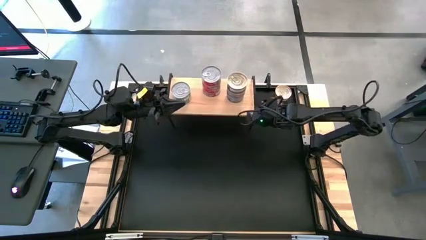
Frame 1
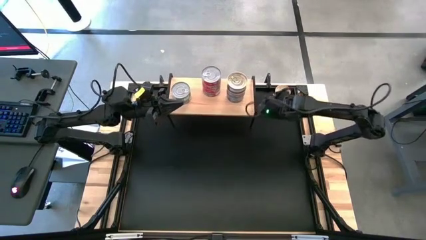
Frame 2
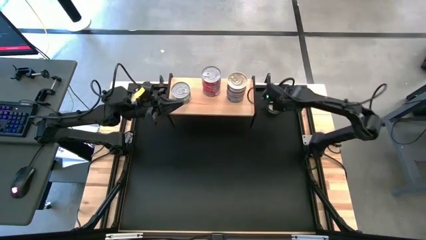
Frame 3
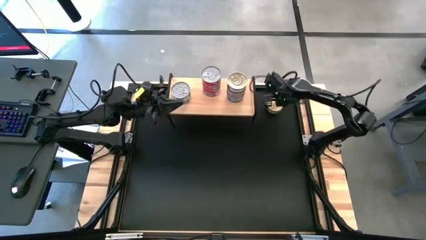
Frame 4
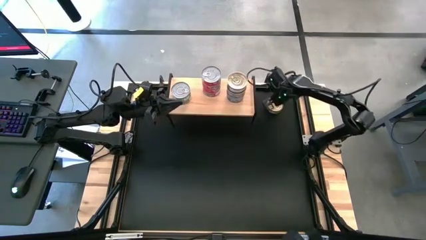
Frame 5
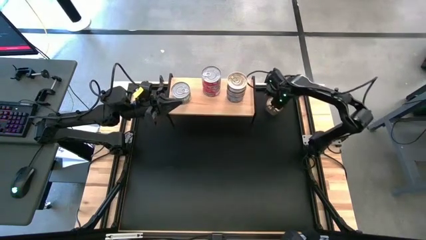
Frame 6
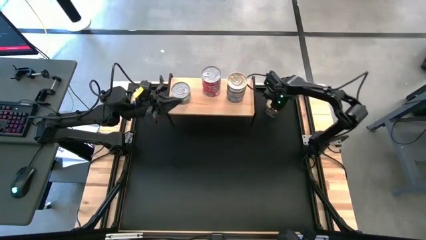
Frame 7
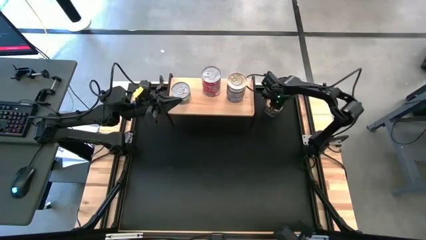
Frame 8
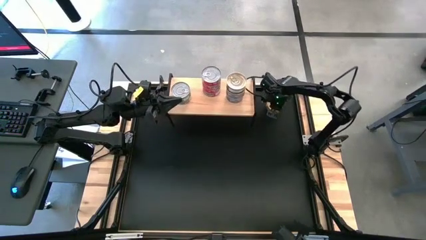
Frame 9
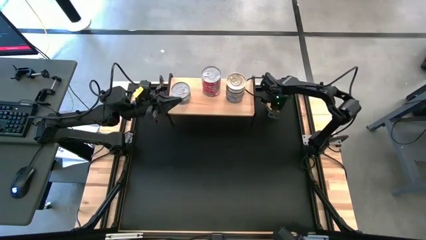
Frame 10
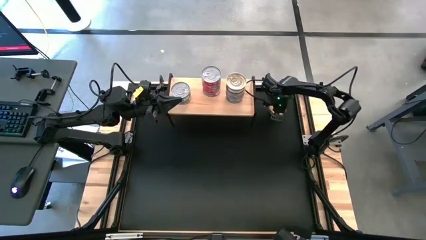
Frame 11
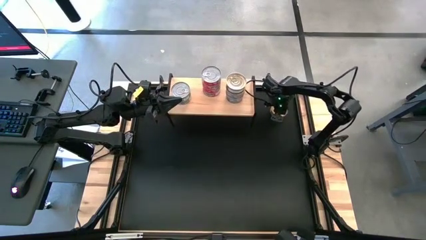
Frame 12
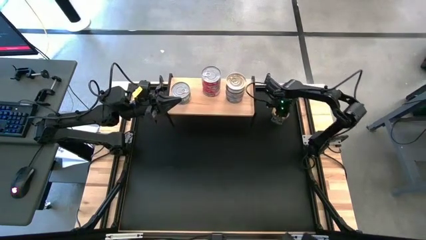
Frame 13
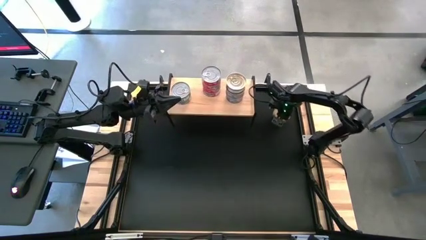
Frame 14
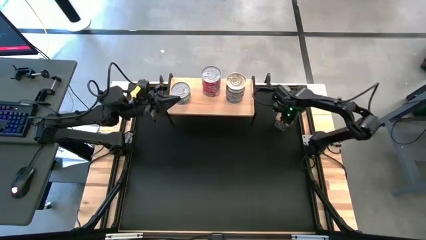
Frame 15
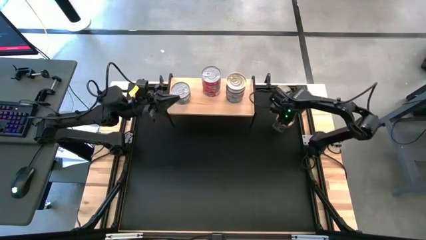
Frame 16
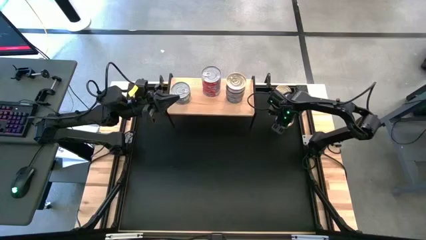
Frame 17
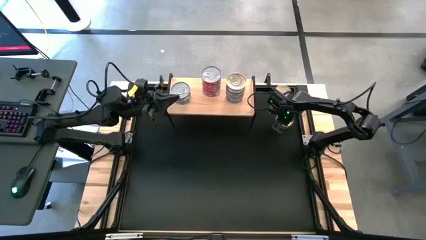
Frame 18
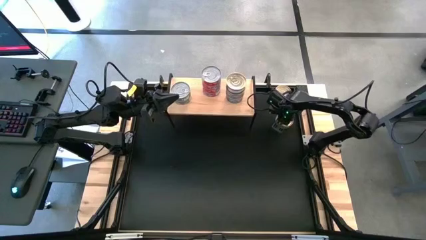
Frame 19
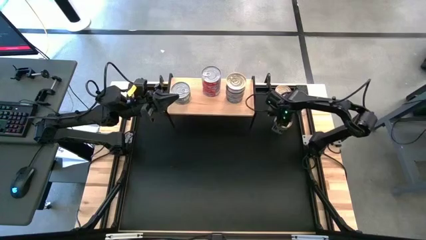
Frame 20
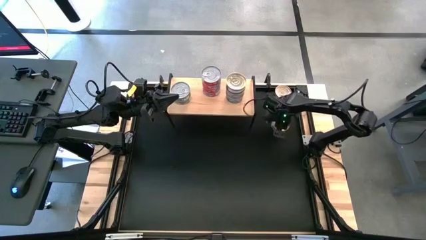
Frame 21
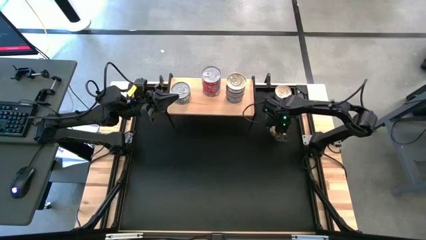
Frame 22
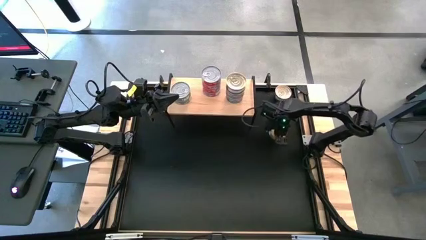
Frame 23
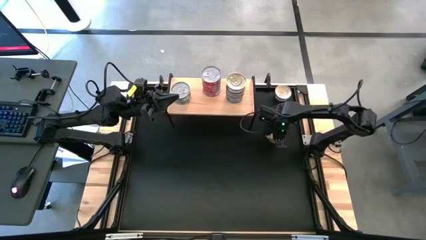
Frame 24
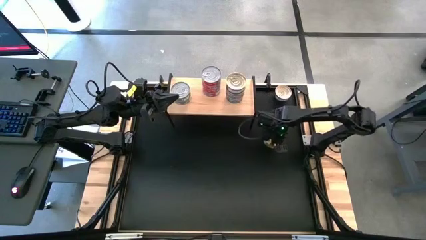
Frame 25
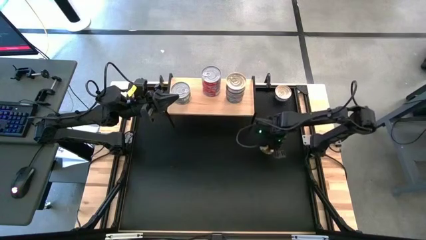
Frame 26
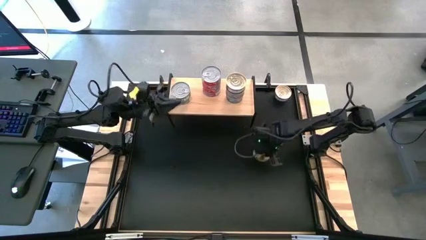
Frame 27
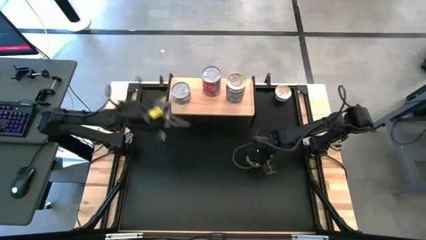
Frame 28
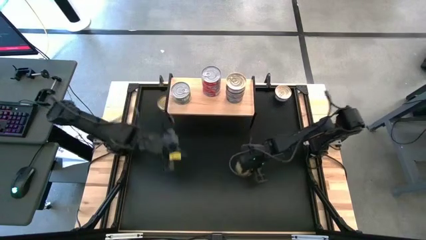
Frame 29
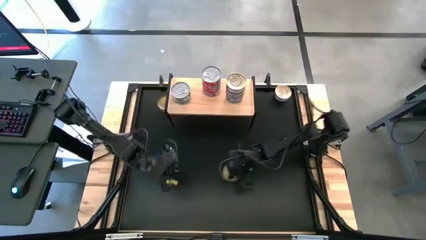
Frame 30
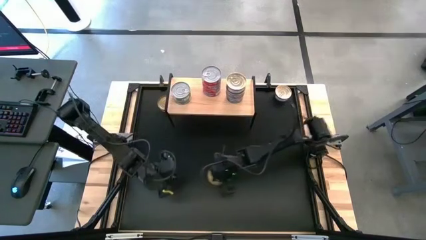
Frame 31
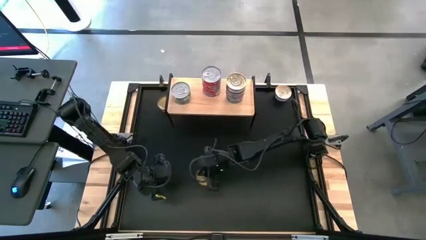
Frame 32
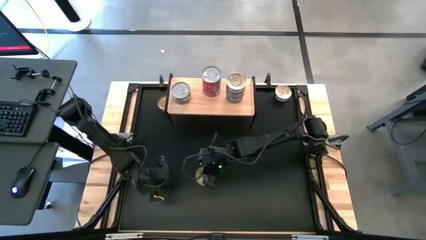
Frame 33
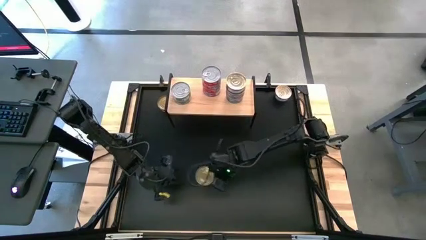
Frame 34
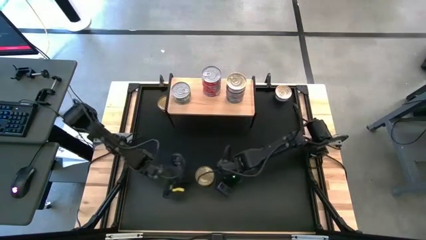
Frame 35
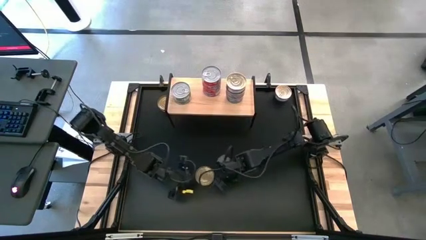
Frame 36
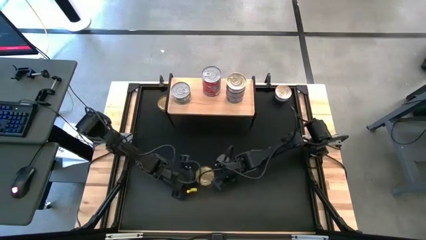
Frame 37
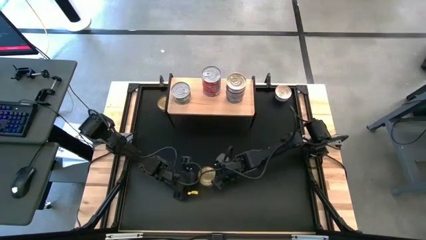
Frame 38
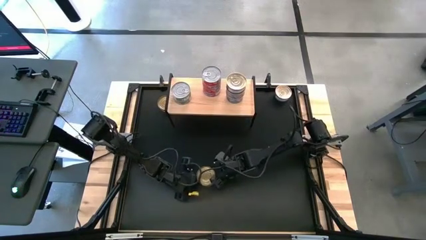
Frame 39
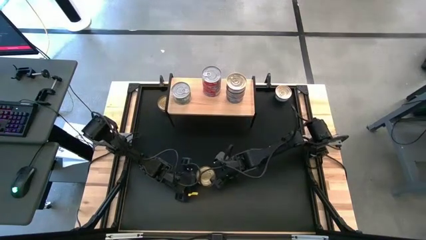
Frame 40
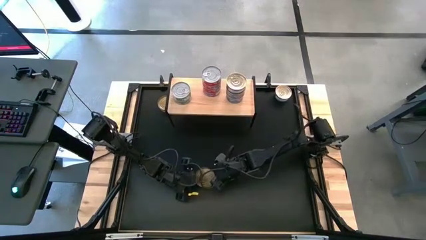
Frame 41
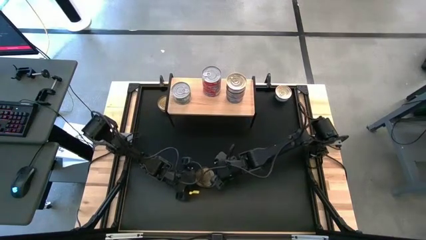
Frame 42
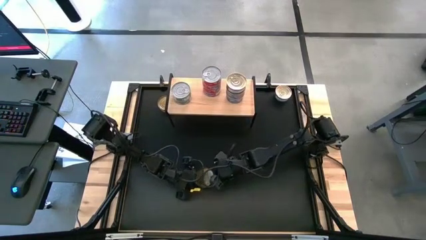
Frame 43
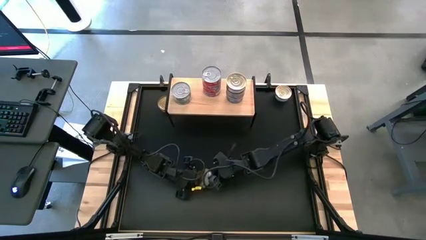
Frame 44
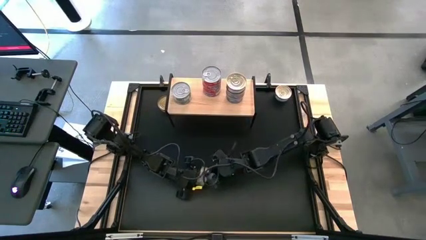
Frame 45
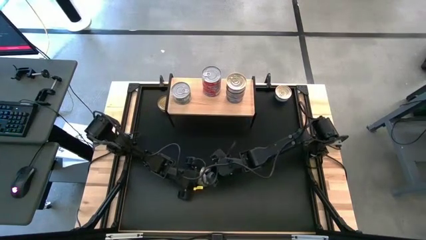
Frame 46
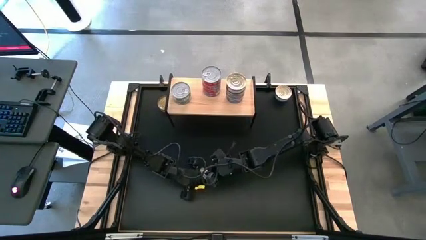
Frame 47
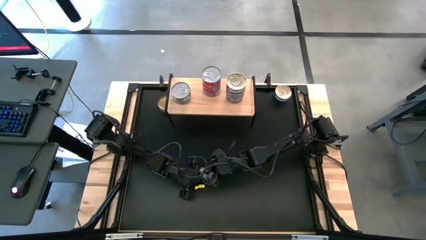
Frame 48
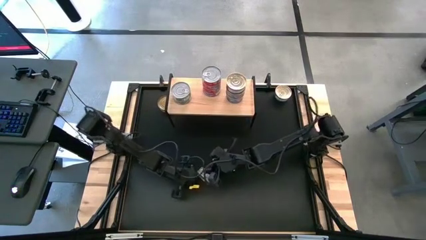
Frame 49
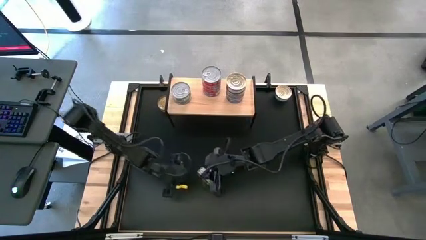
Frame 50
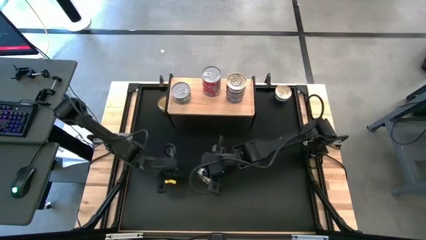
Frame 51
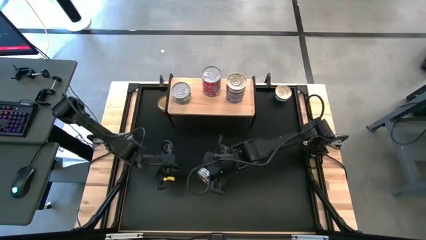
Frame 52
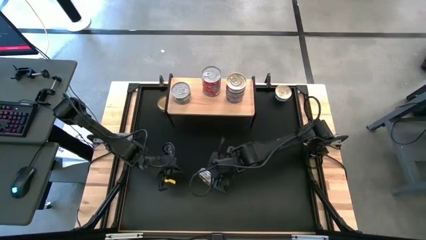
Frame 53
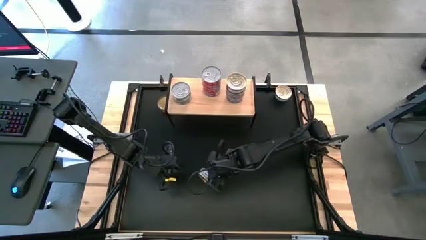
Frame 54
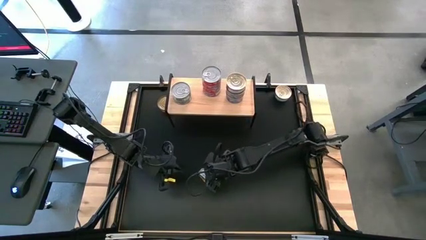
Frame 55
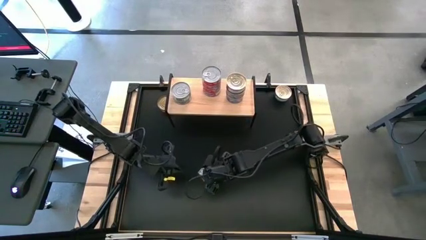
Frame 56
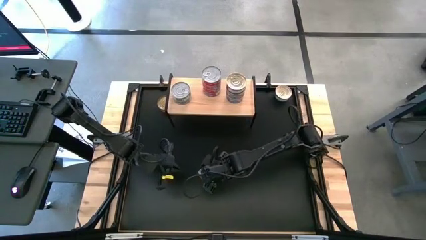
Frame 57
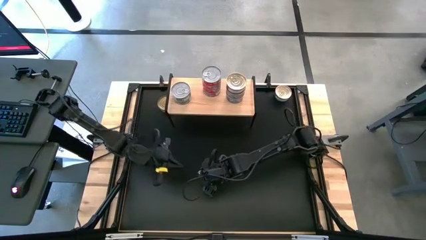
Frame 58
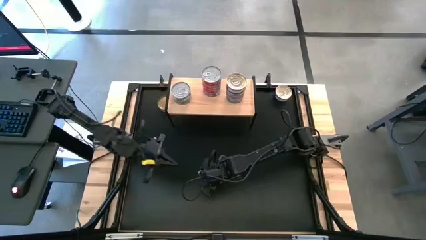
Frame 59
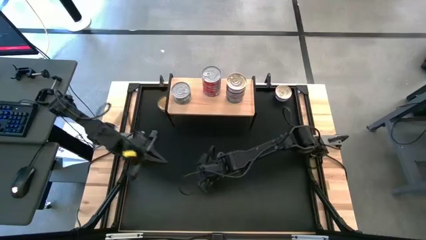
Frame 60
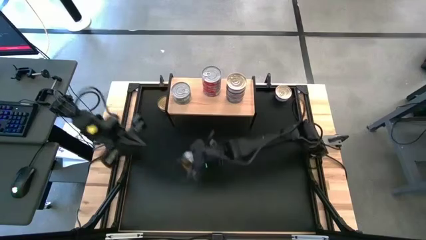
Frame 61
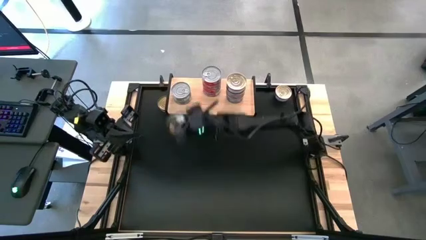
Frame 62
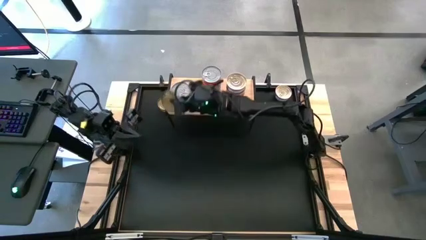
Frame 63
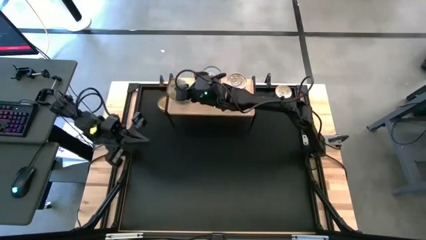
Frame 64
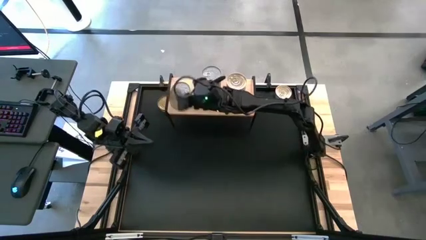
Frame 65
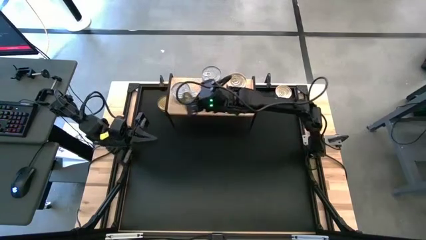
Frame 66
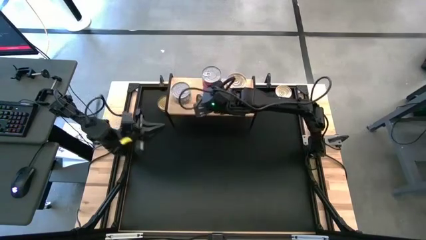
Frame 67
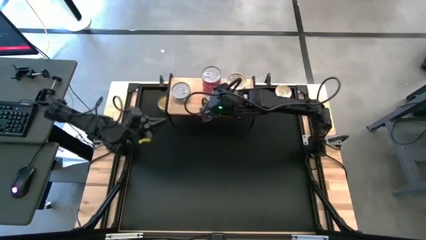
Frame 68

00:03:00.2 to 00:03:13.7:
Task: Stack canned seafood by type on shelf
Put the green tuna can on the shelf
